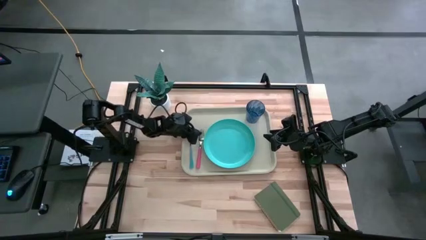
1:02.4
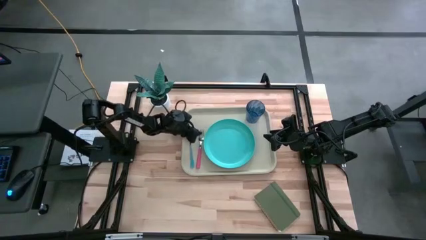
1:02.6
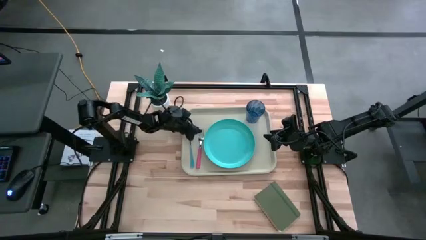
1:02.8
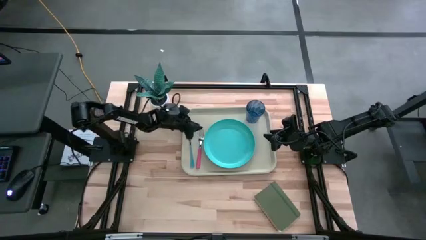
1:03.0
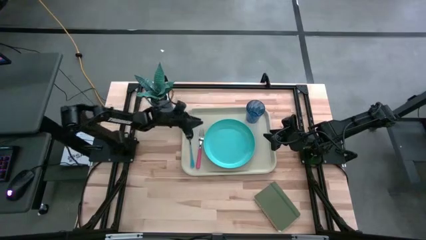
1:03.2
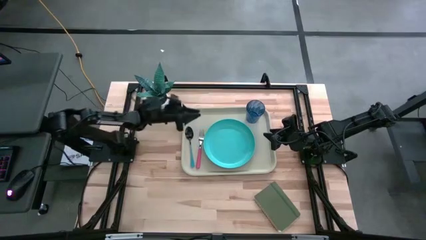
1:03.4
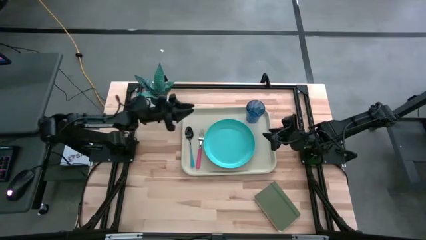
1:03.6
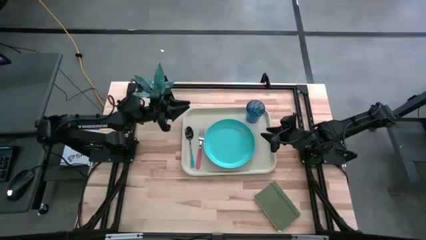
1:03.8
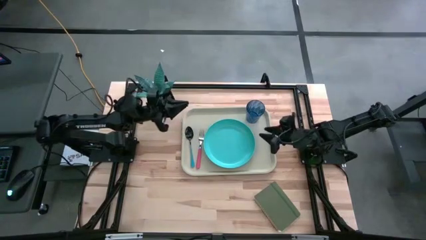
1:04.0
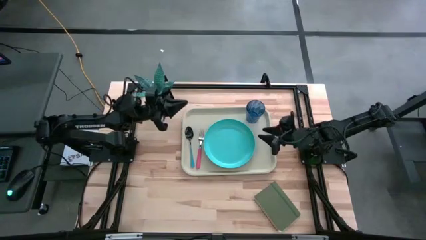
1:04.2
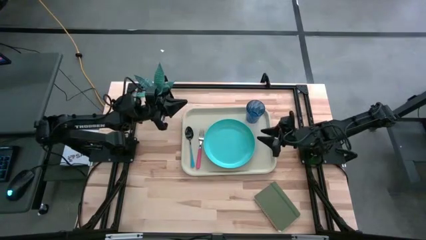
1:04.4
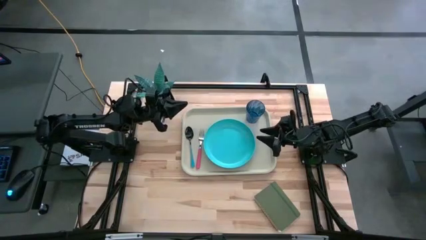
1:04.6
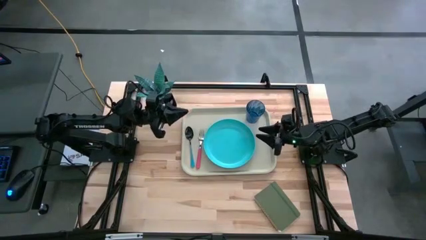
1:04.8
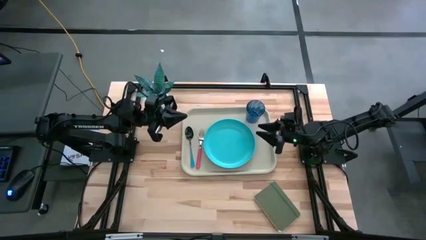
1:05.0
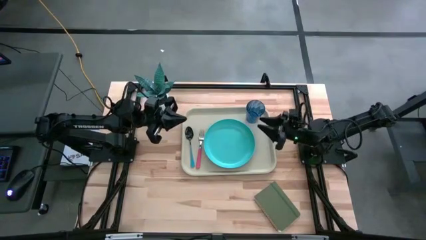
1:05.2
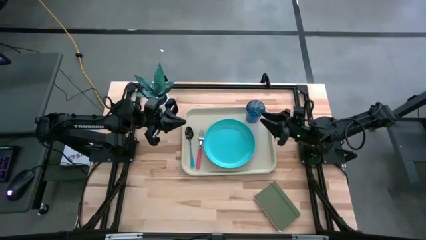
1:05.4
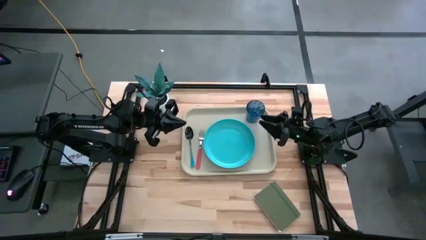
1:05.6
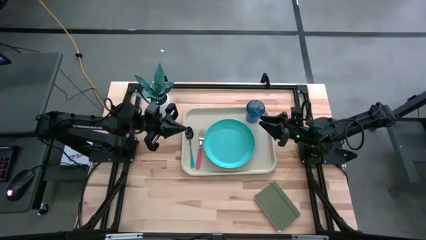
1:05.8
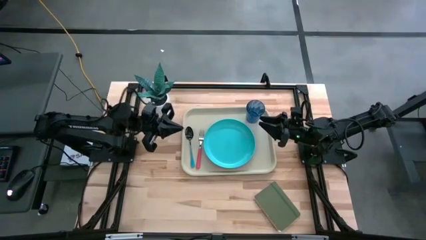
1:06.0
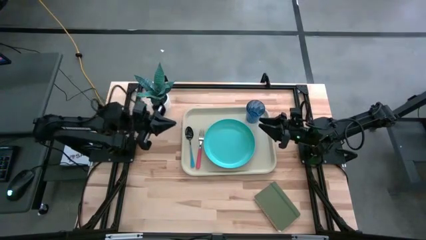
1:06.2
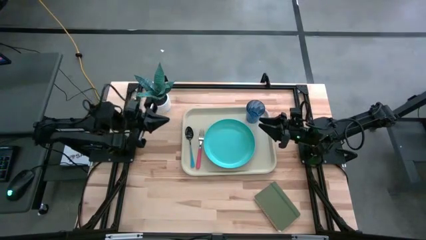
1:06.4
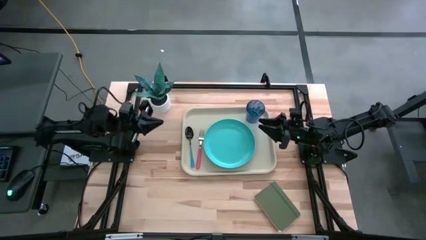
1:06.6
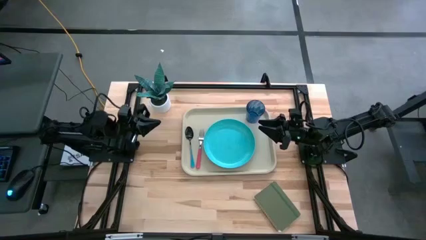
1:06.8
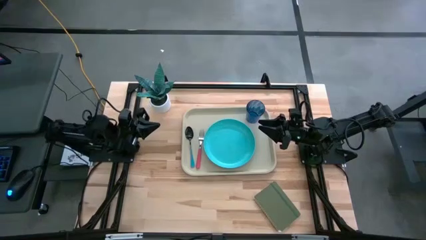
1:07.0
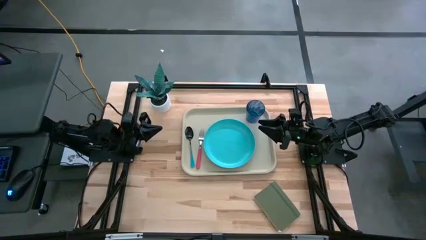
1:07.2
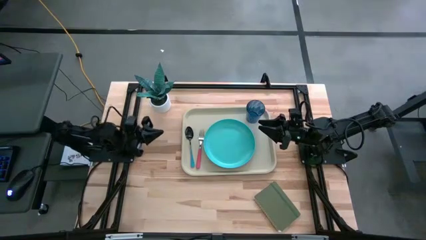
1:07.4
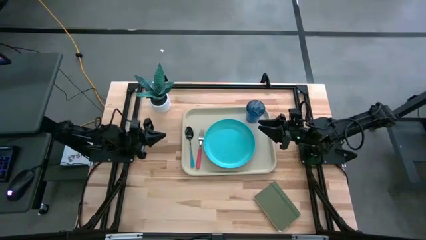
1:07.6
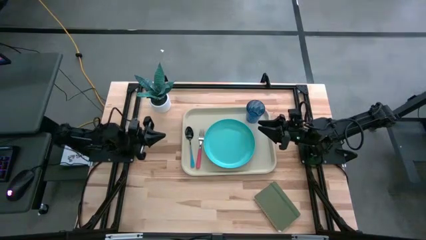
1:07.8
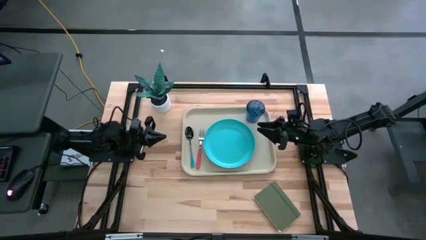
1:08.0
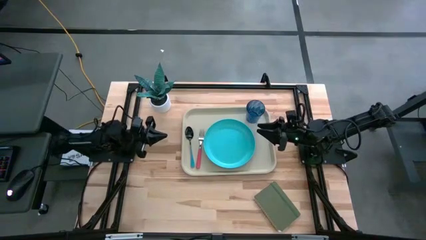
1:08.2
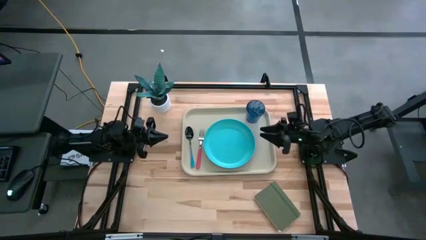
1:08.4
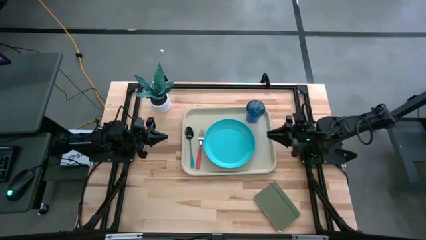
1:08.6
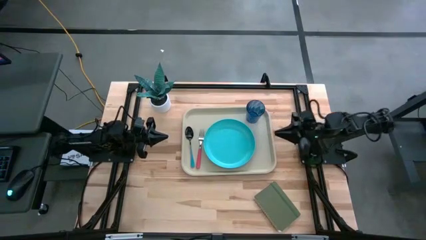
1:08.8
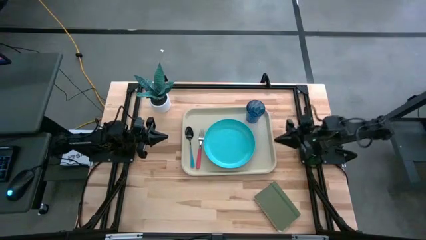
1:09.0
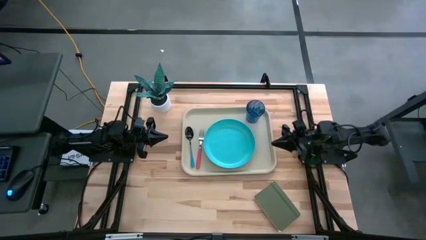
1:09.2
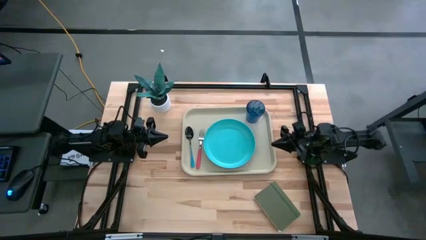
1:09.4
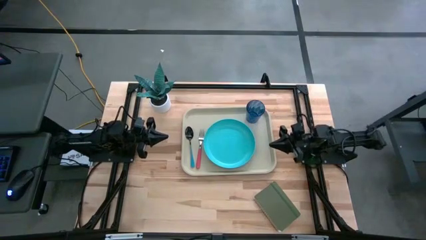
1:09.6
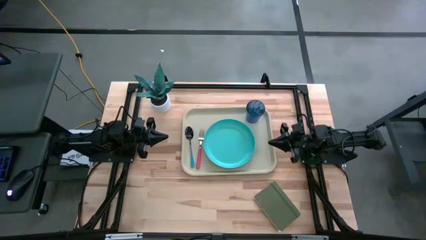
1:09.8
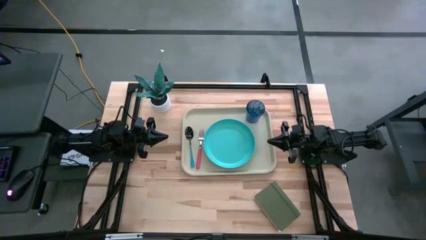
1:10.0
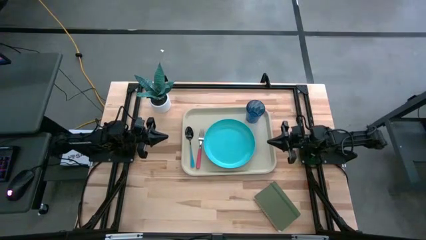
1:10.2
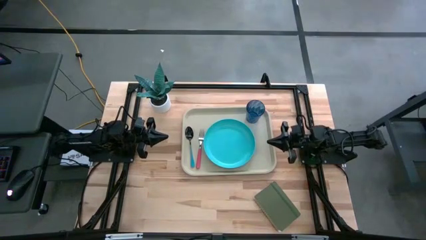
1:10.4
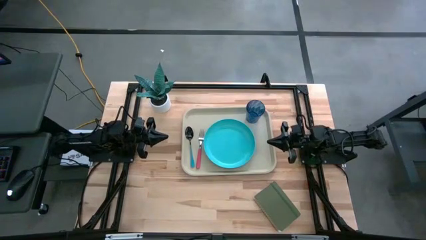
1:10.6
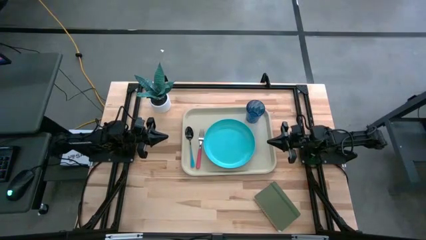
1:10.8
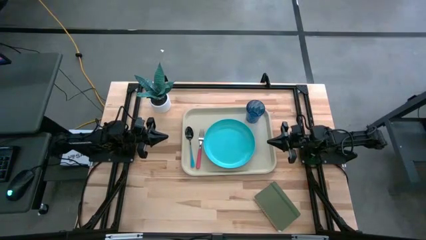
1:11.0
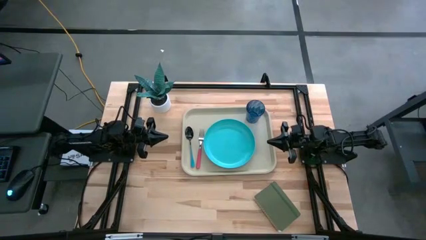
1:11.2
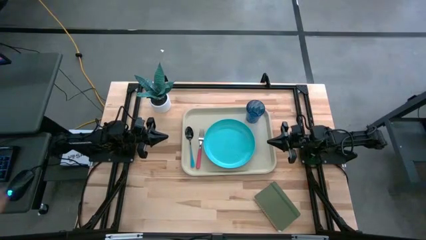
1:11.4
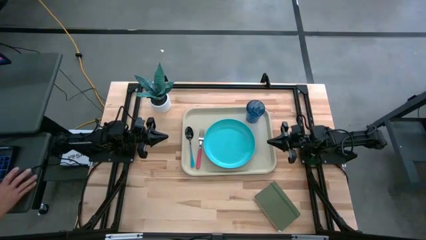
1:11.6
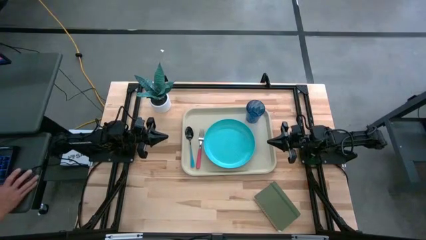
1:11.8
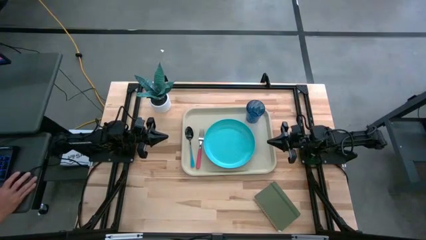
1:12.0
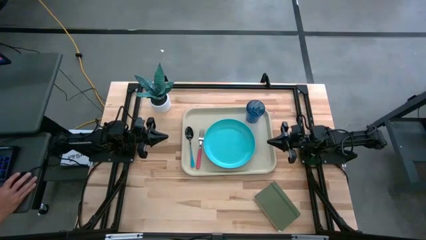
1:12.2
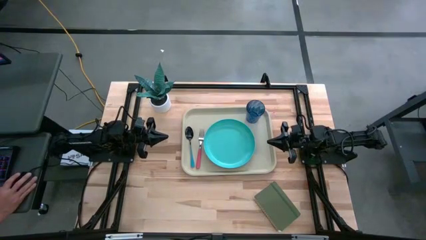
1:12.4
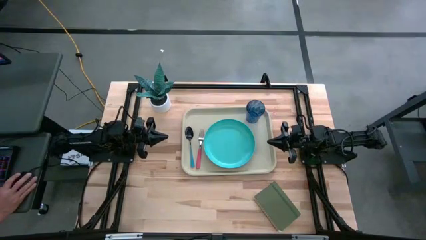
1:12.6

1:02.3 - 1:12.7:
Task: Pick and place plate/cup/fork/spoon on tray
Return to Home Position

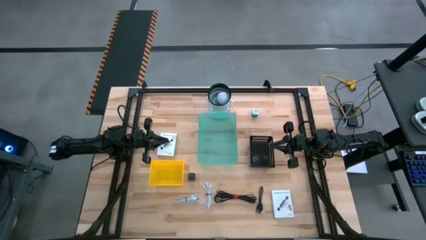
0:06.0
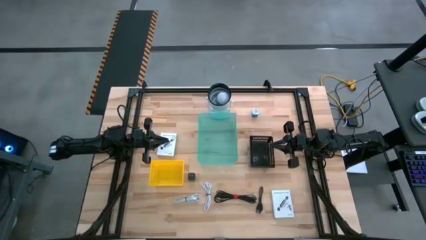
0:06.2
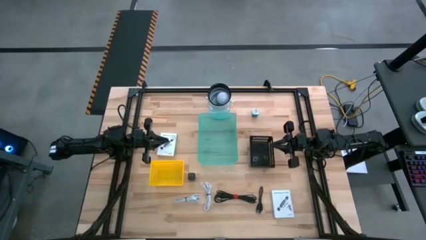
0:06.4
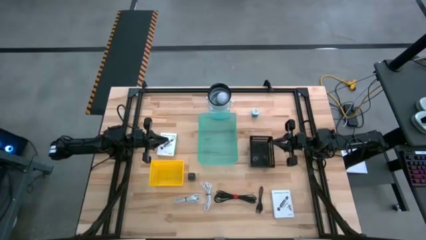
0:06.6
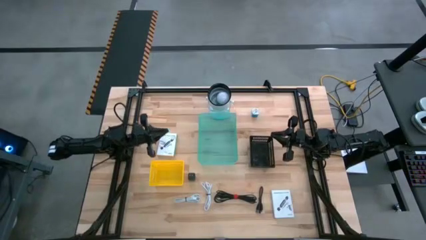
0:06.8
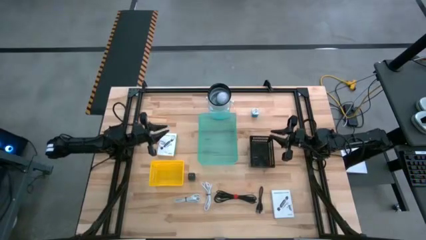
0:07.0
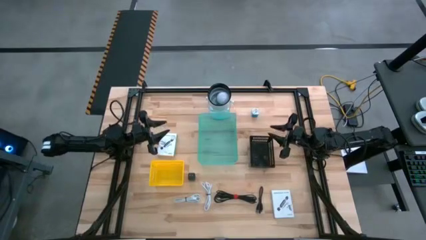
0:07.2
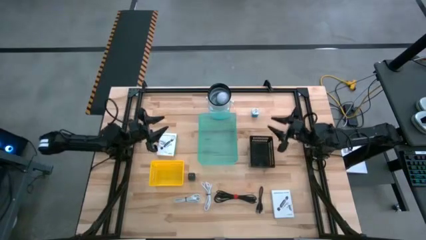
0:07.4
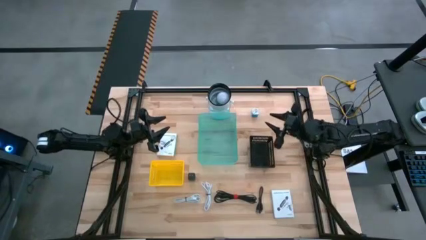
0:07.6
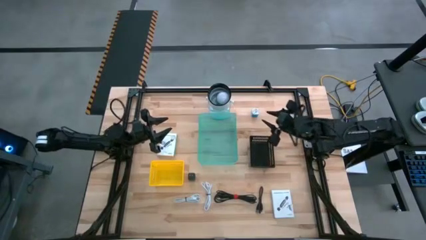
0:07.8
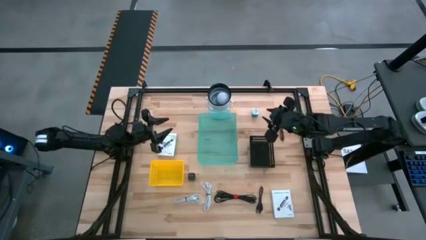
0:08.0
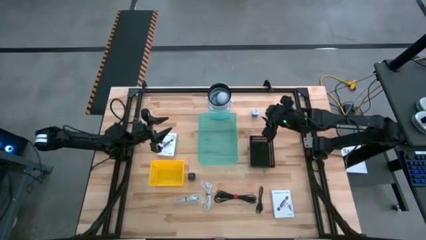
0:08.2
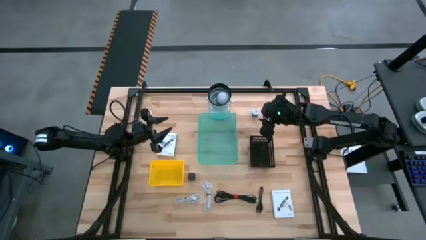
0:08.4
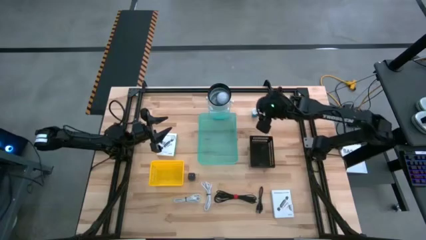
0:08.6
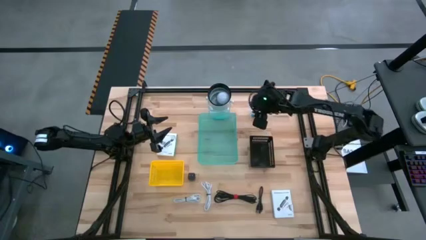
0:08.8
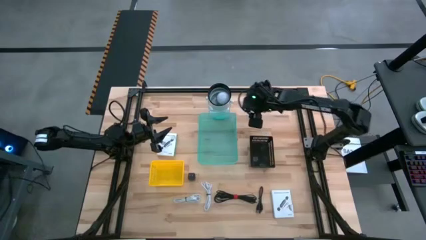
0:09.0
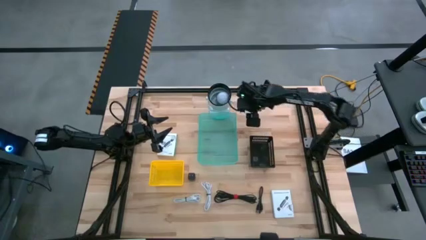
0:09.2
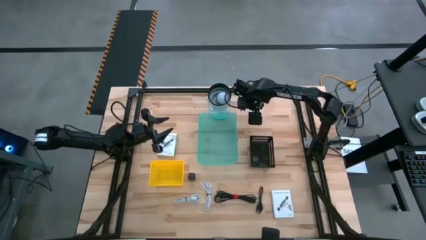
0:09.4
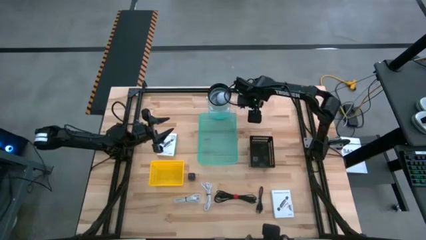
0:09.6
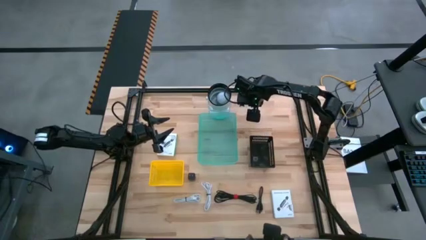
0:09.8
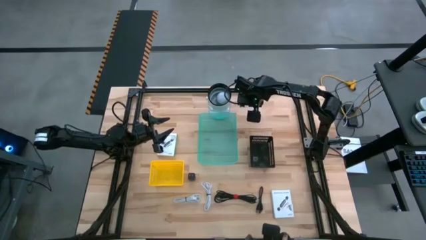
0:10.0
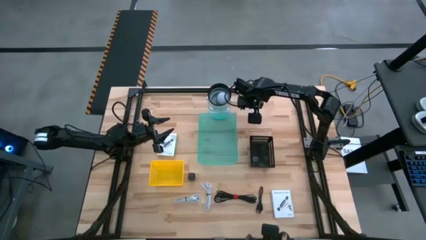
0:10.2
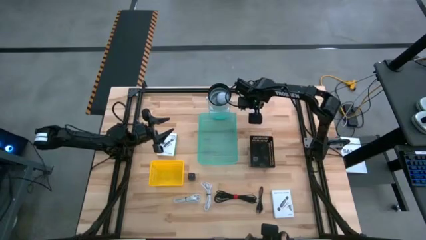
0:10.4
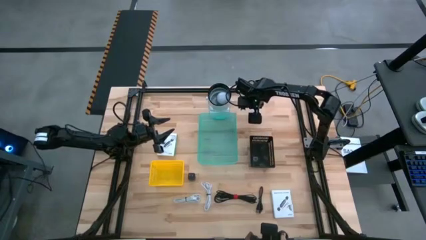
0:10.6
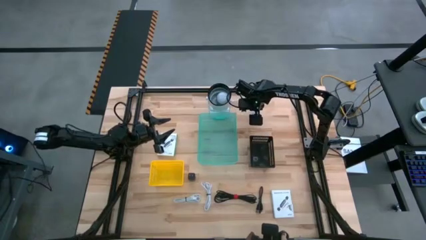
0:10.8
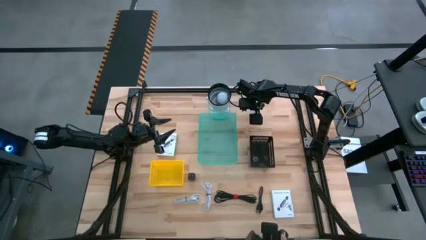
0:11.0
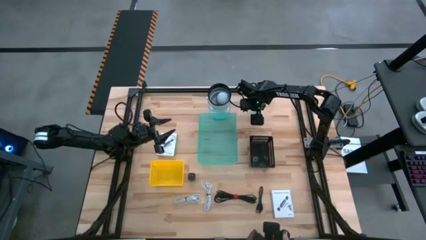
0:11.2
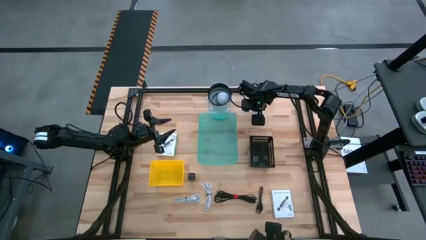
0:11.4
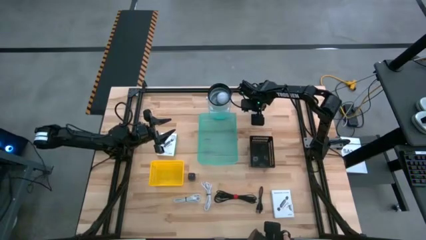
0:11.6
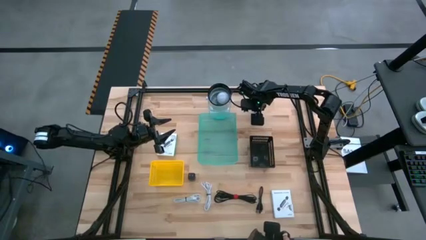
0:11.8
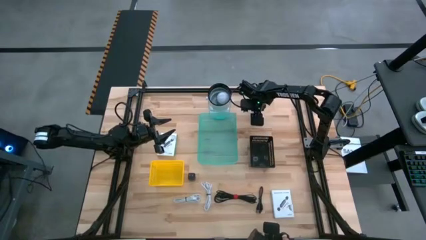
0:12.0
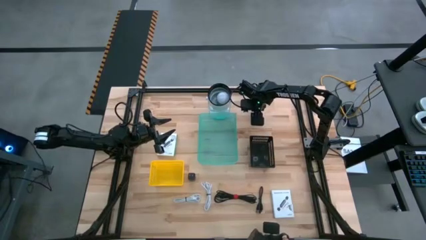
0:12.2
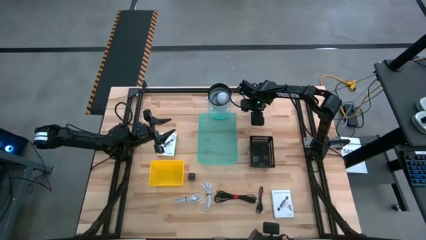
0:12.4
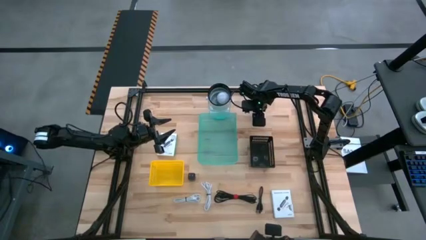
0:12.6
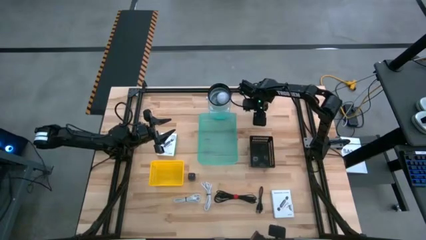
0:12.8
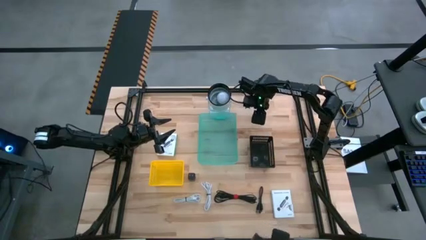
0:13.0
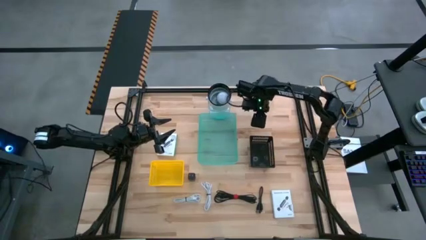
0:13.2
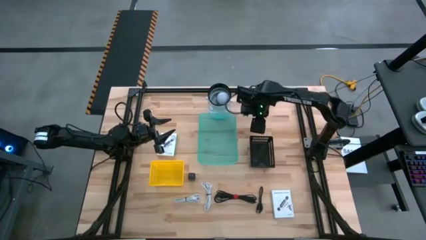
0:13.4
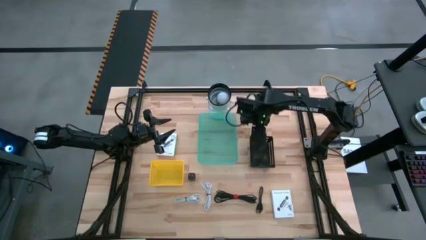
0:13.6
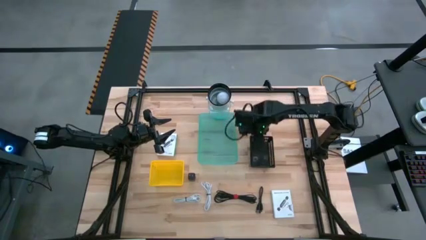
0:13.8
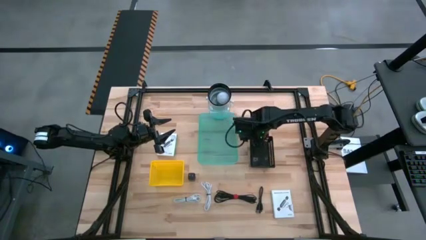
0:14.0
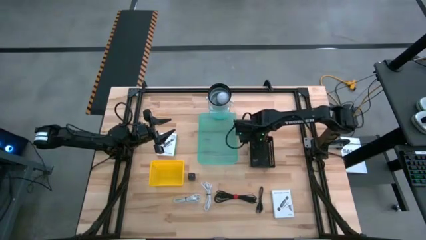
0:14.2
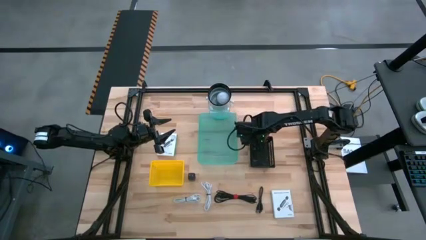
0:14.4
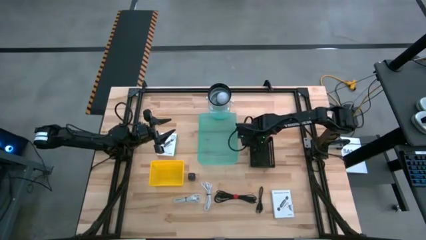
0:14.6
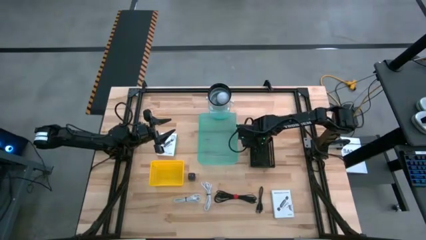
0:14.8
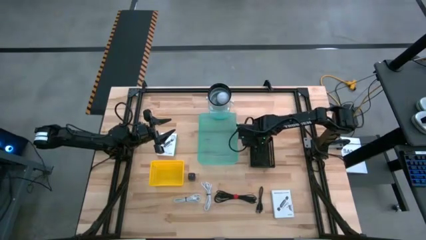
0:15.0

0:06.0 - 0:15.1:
Task: Pick and place items into bin
Put the blue charger adapter into the black bin
